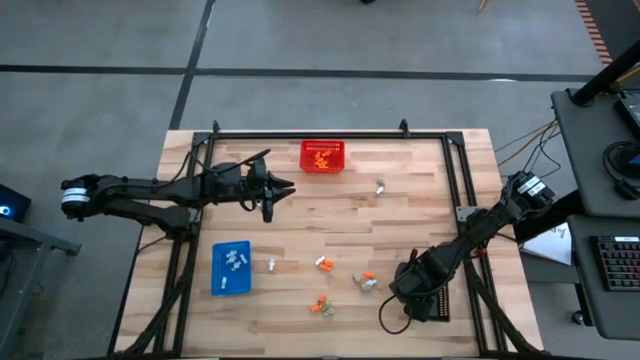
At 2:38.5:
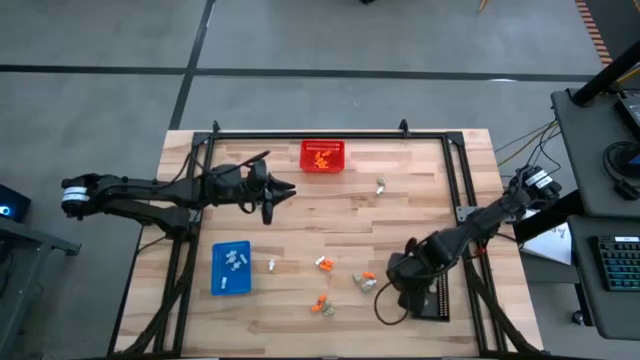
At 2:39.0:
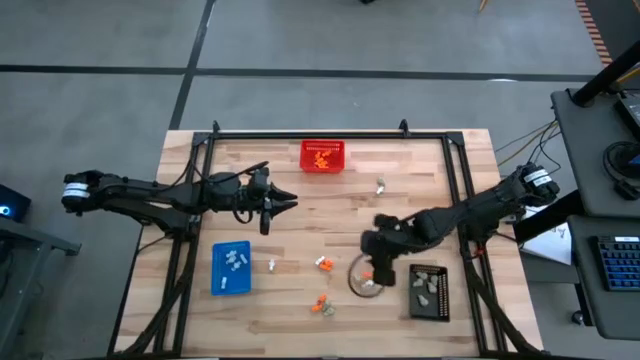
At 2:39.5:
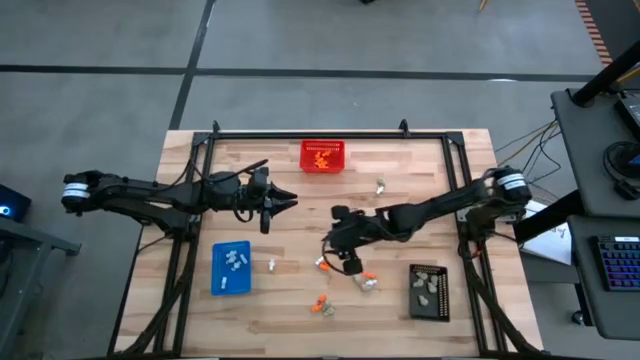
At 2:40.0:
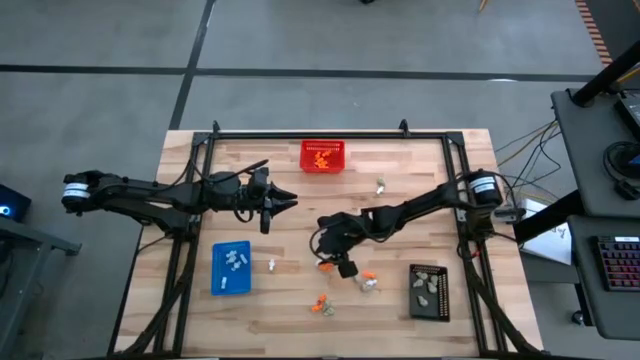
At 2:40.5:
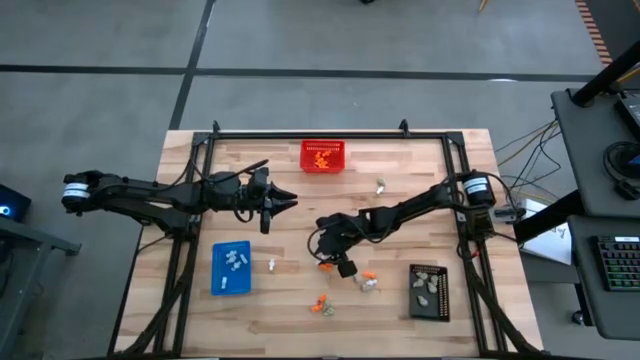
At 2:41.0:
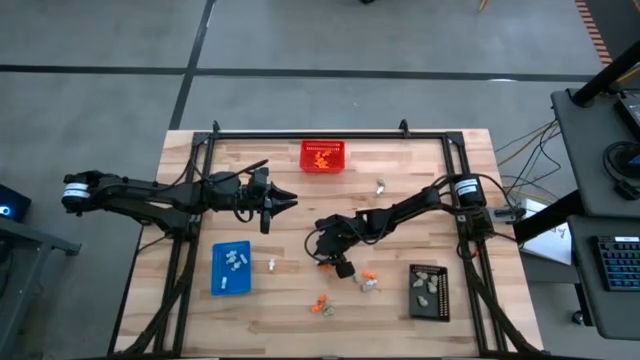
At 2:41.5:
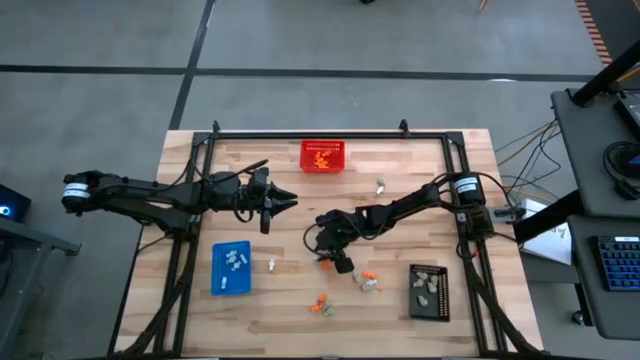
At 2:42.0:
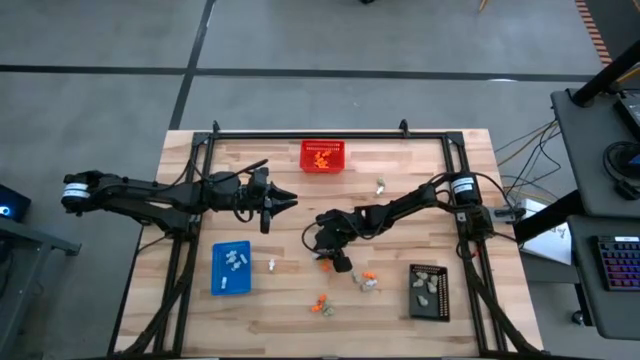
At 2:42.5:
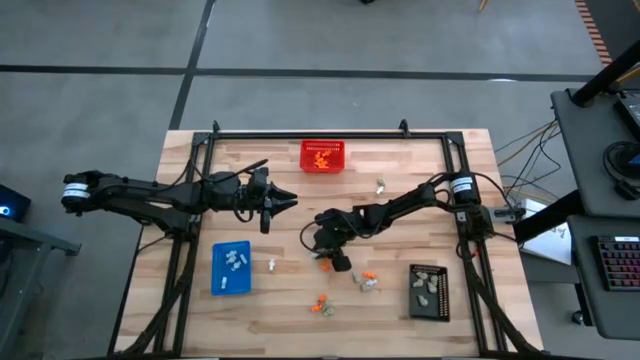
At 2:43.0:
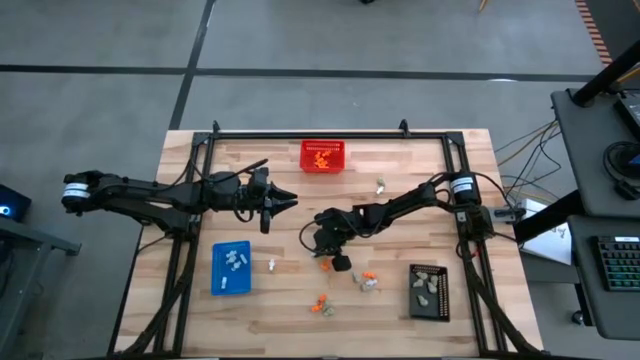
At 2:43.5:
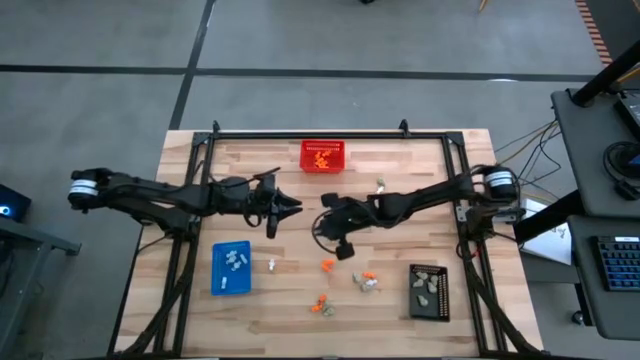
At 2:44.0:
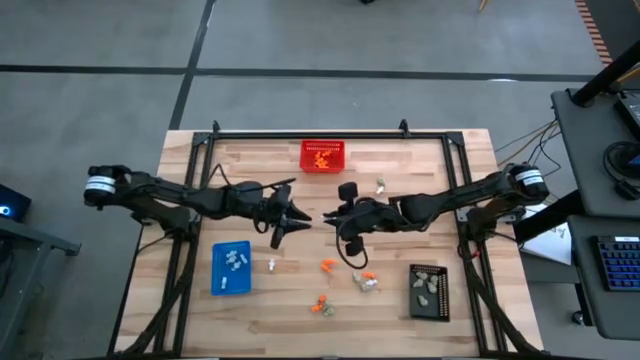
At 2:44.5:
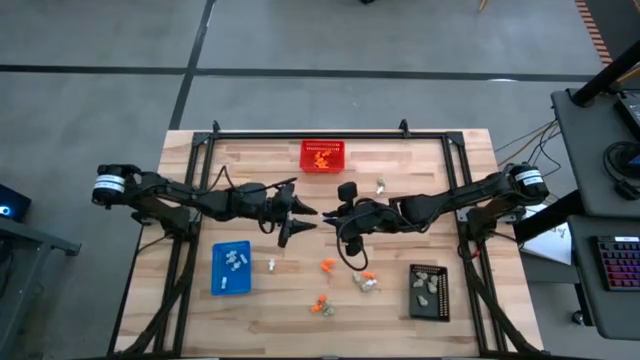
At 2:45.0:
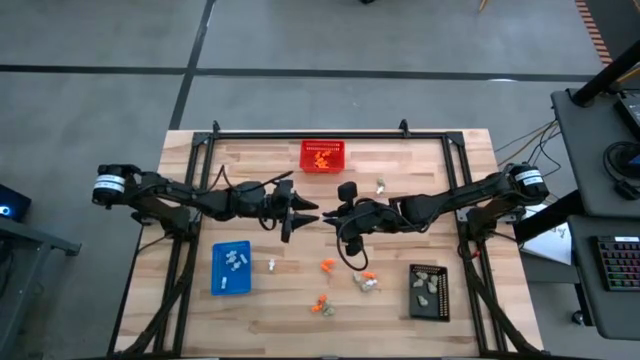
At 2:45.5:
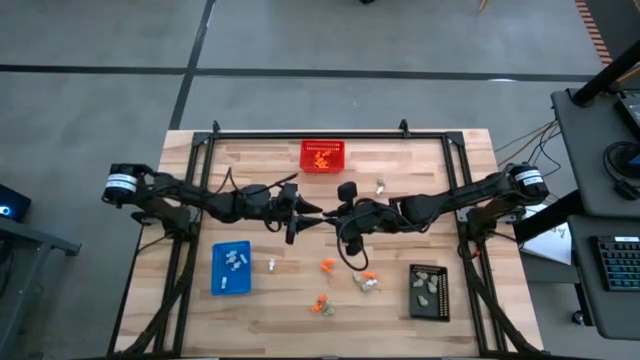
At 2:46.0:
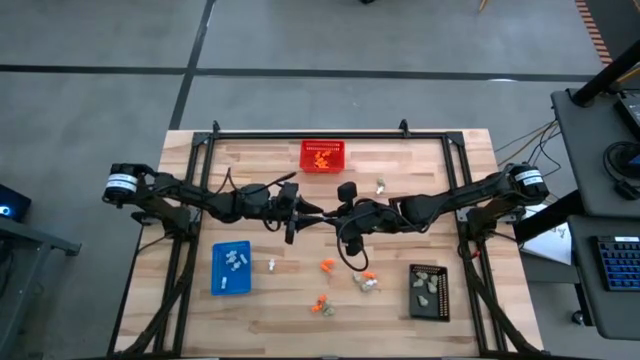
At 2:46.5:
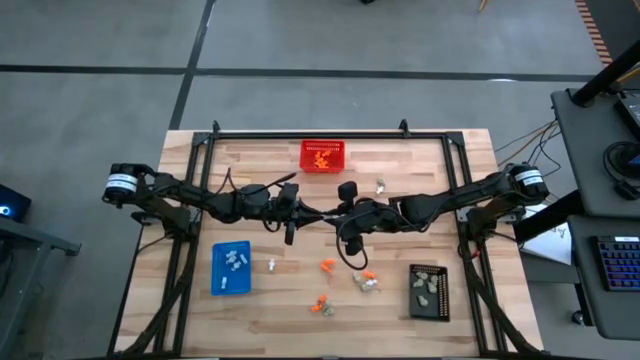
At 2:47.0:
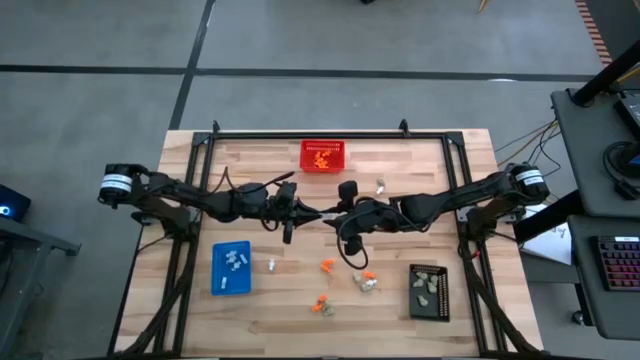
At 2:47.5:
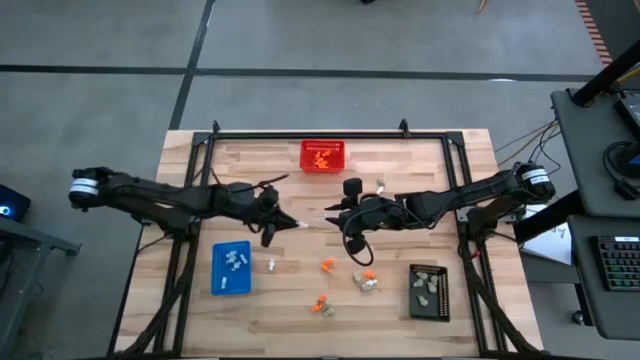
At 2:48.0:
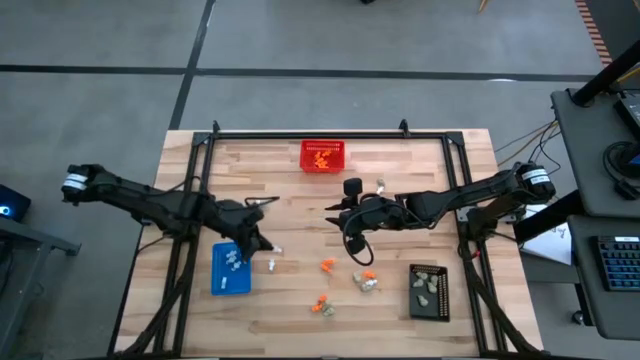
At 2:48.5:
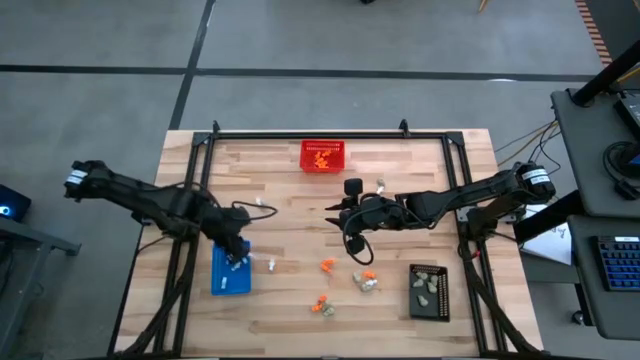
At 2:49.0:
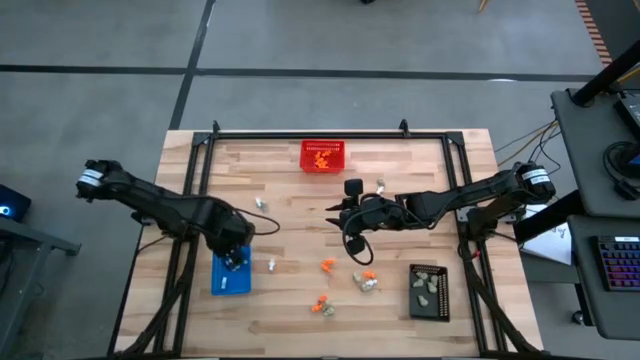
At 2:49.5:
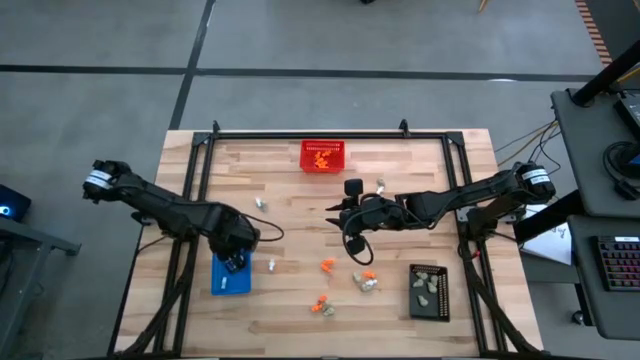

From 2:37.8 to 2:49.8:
Task: Sort Halloween decoration
Put the white skeleton toy into the blue bin

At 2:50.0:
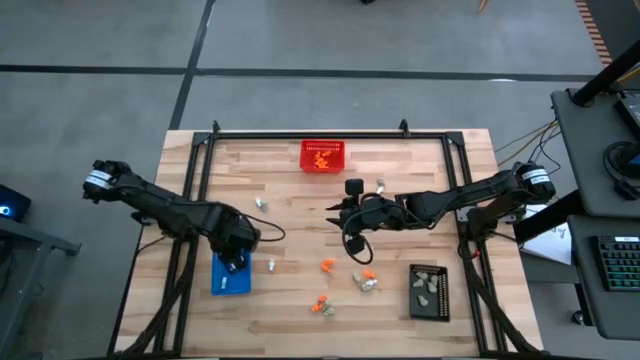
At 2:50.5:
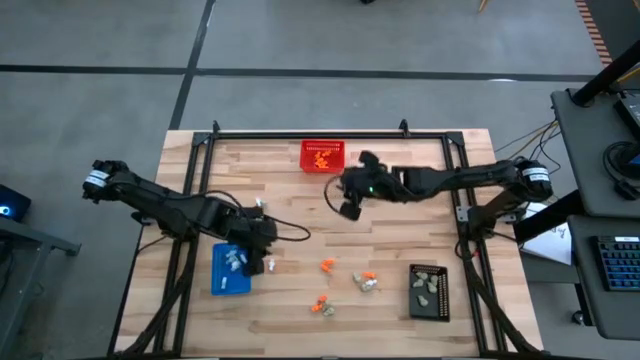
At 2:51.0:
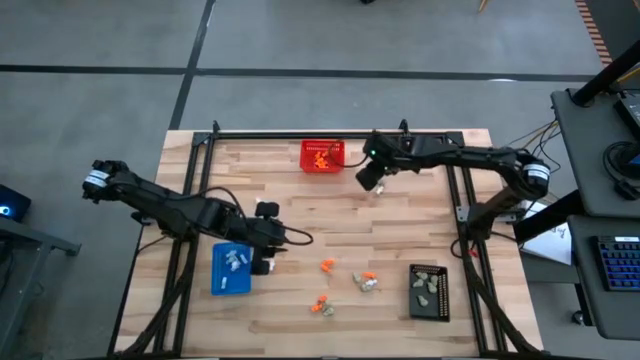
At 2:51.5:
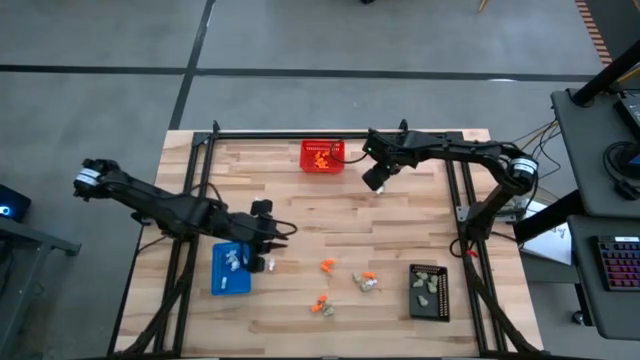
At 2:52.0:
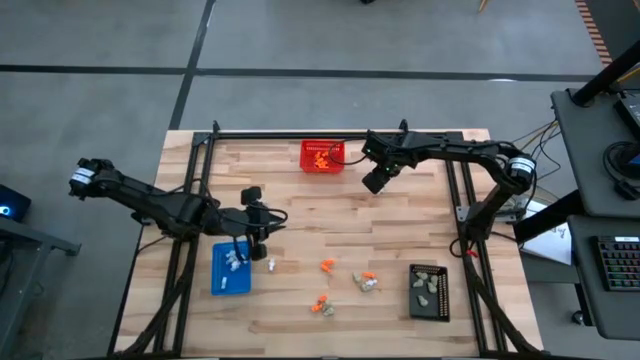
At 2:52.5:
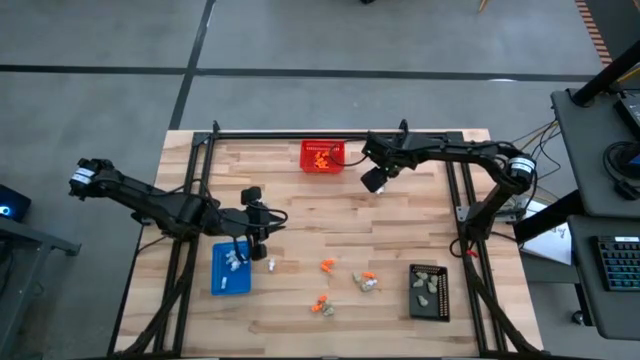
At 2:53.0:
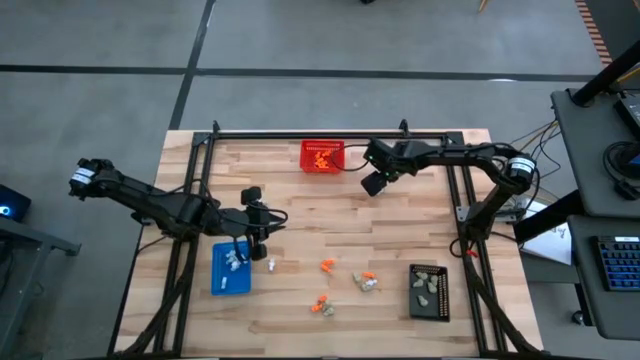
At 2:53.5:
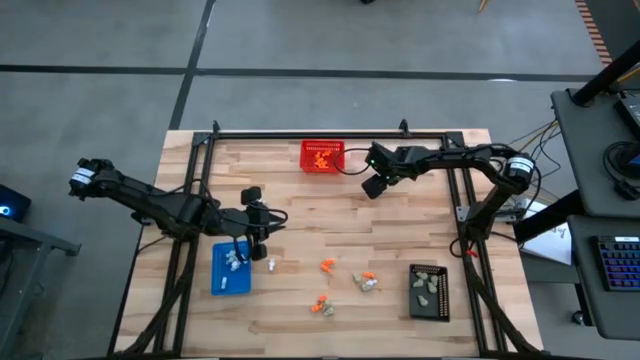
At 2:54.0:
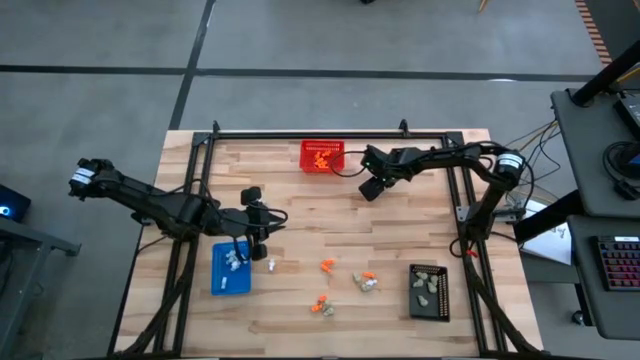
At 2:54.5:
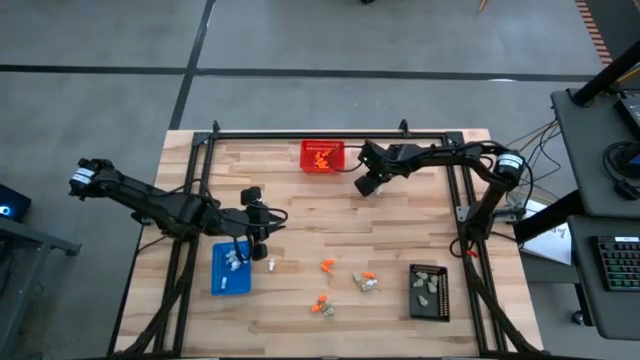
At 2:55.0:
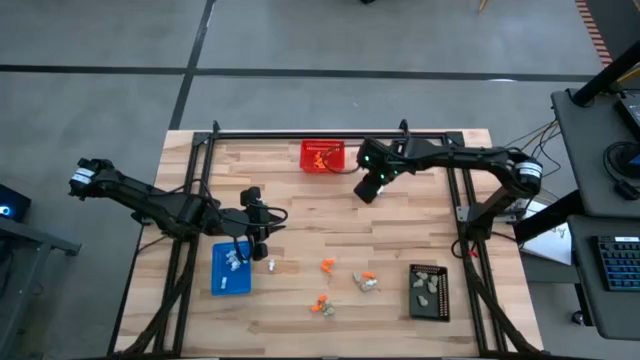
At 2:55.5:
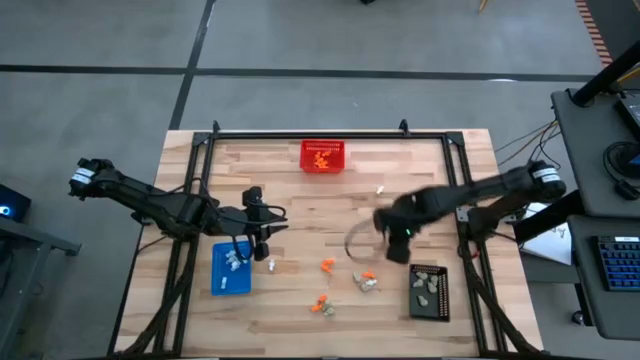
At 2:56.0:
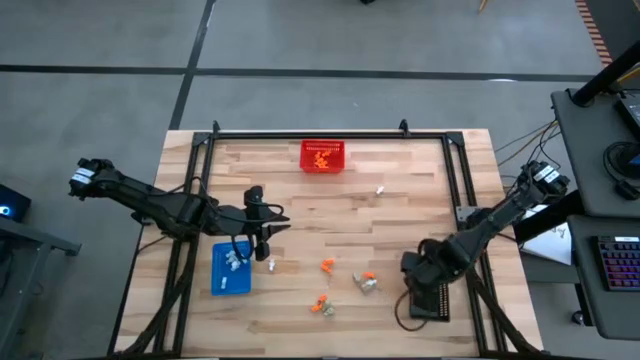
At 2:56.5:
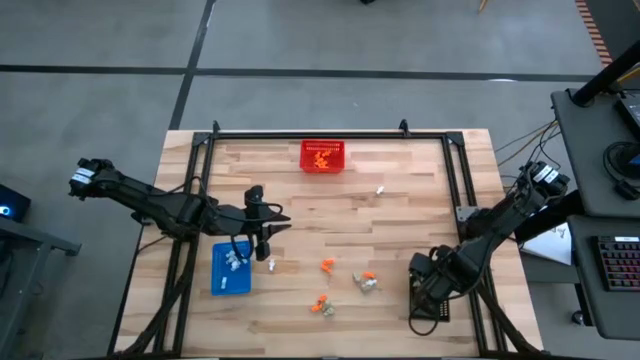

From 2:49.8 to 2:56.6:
Put the gray skull toy into the black bin

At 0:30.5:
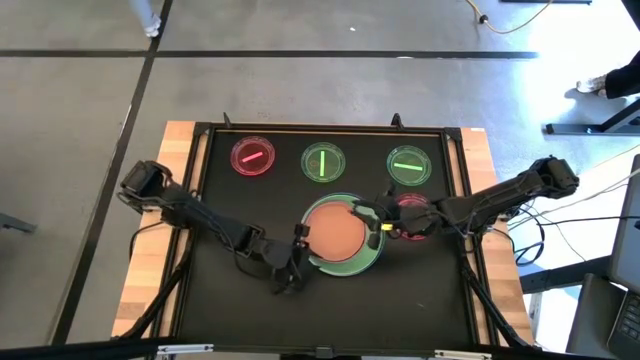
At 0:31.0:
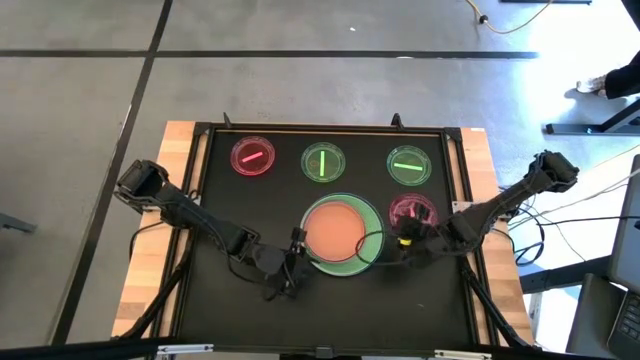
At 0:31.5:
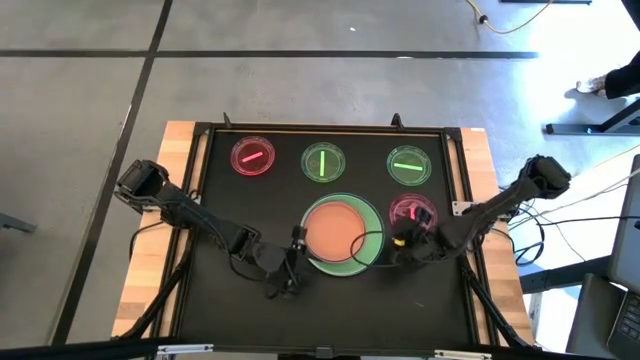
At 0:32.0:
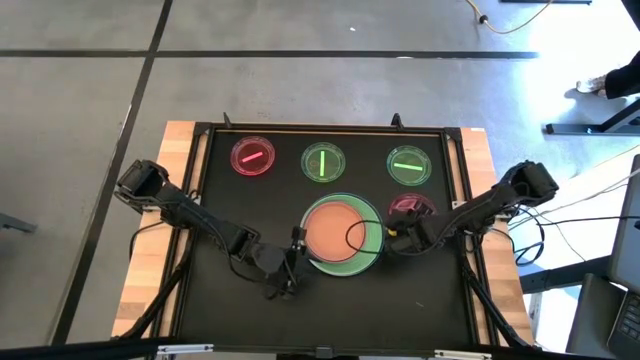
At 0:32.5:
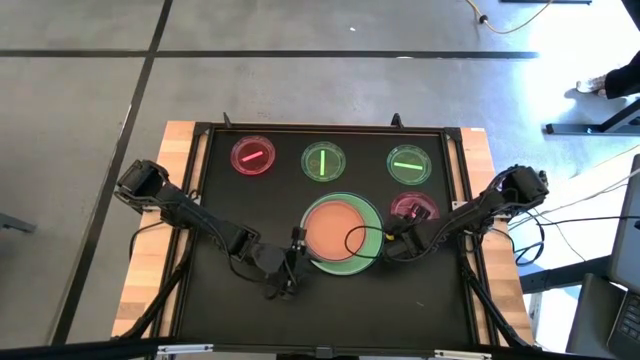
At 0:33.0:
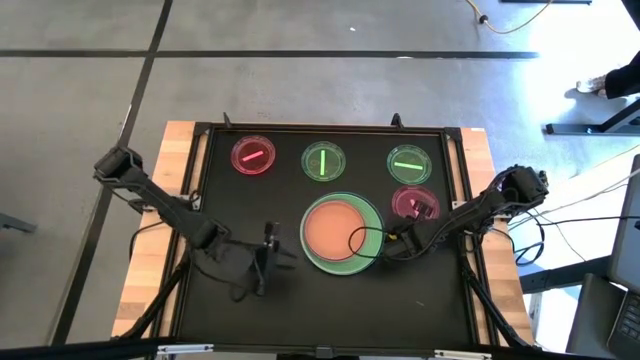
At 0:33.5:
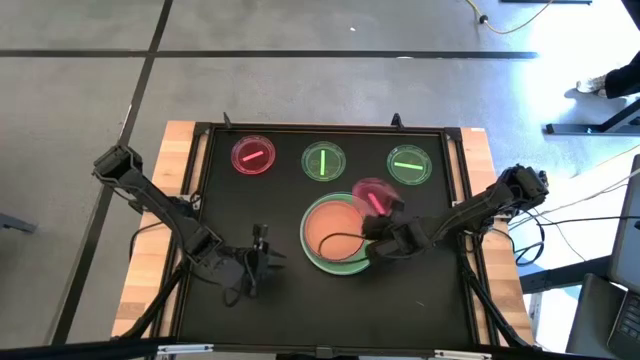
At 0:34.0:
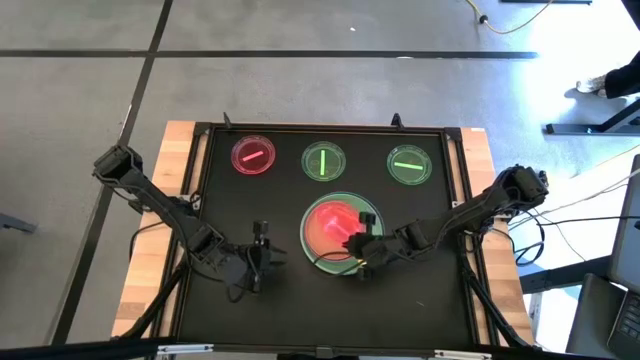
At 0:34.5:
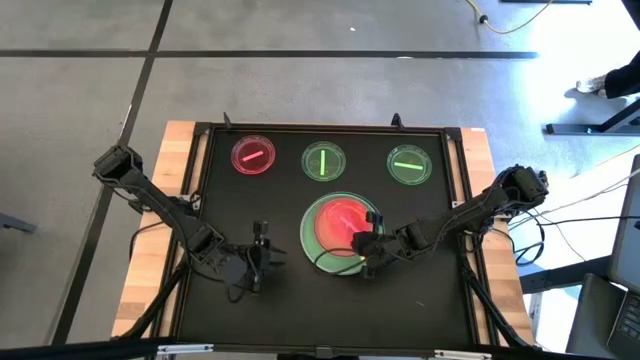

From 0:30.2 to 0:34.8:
Task: Stack plastic plates
Stack the transparent pink plate on the orange plate
